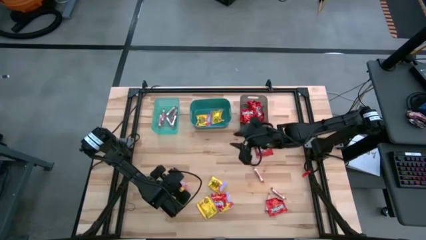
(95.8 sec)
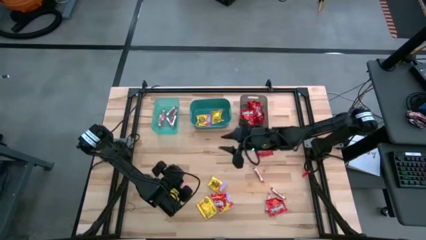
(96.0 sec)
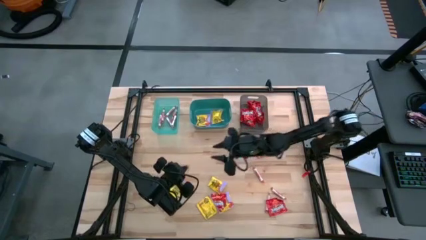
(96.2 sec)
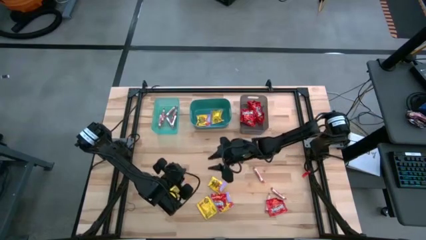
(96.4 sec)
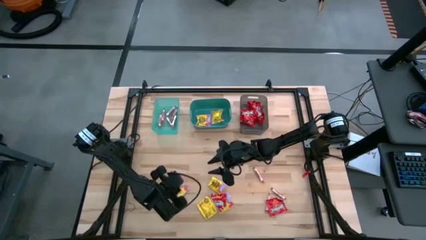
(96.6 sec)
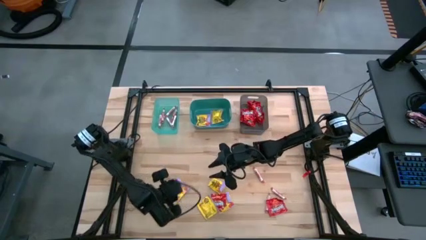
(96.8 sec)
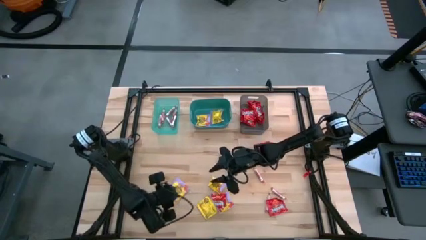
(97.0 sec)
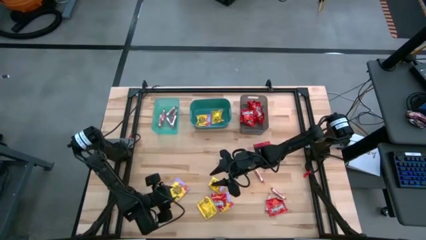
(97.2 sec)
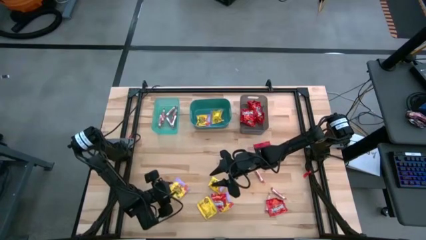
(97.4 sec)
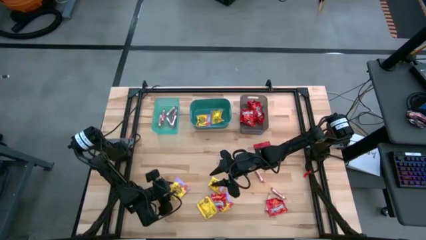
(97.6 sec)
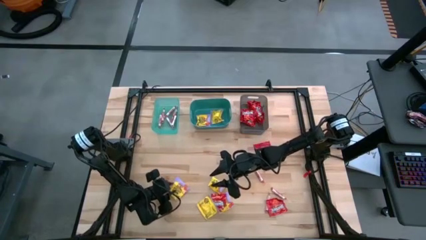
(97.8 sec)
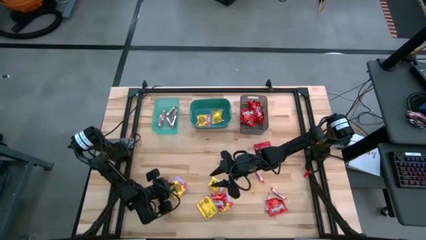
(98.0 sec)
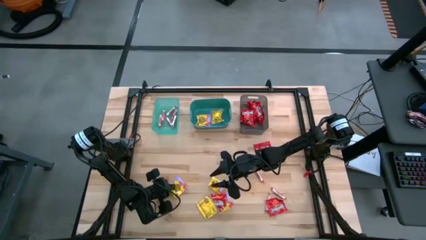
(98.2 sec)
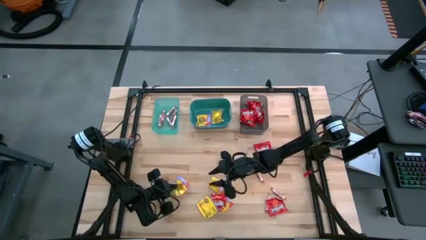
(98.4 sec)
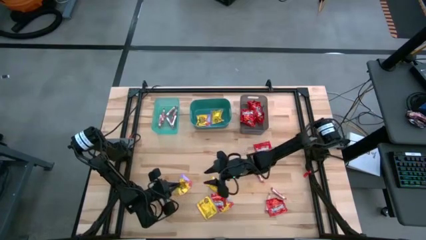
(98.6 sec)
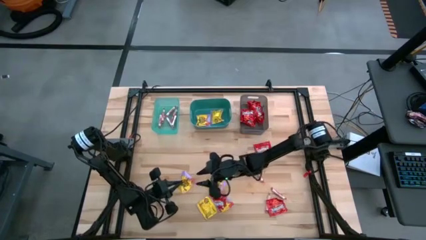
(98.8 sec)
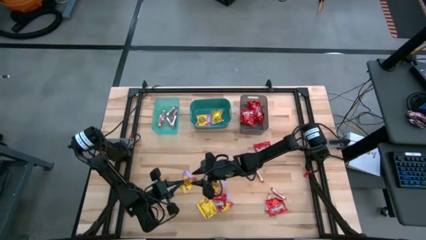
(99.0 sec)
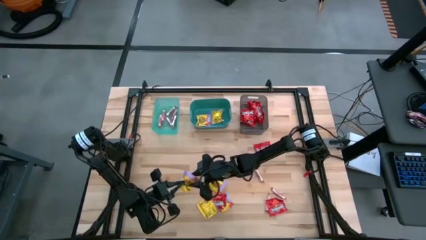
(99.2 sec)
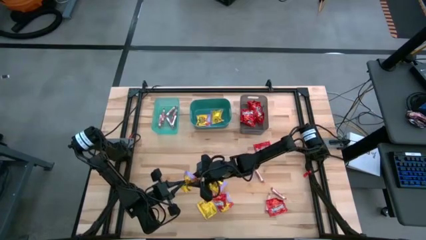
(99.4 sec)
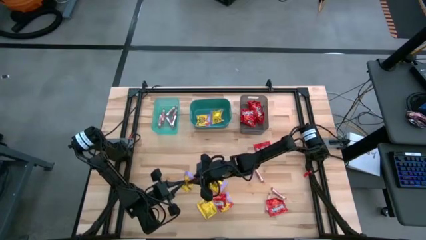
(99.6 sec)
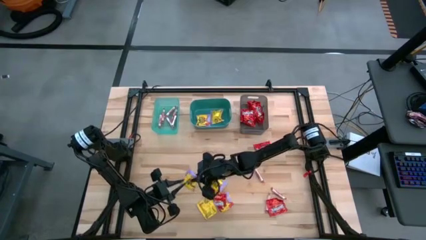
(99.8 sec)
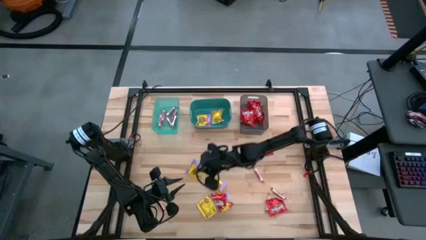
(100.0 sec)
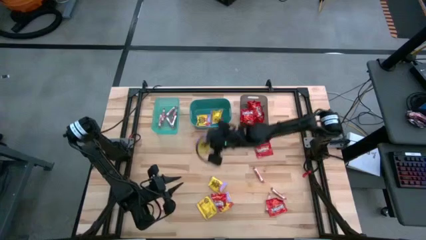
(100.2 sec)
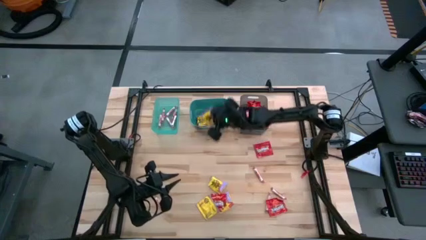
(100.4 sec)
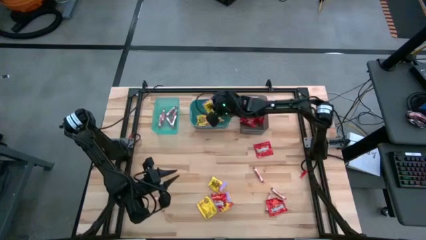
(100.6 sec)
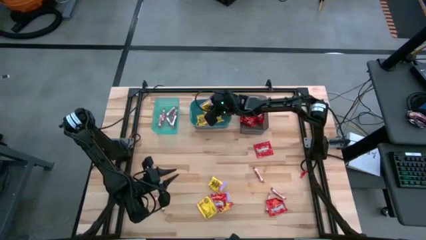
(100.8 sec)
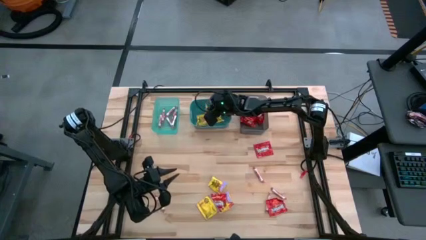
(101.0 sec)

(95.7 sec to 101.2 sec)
Task: Sort candy
Put the yellow candy into the green bin

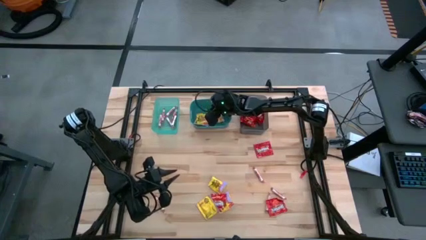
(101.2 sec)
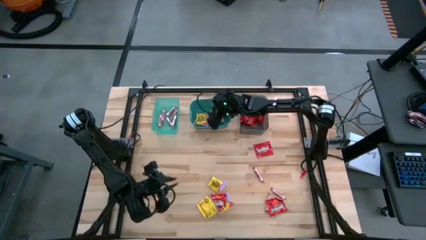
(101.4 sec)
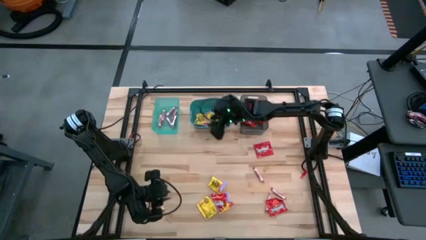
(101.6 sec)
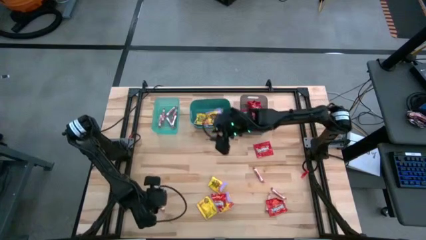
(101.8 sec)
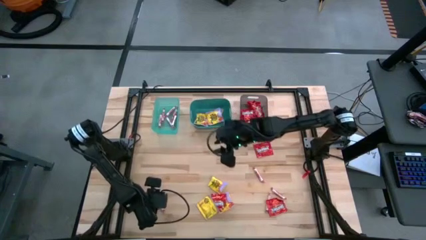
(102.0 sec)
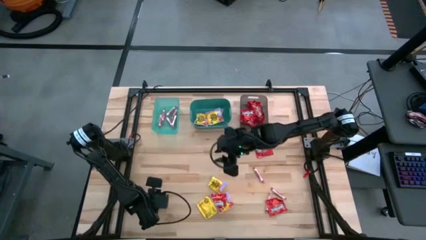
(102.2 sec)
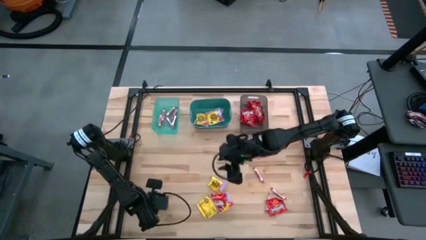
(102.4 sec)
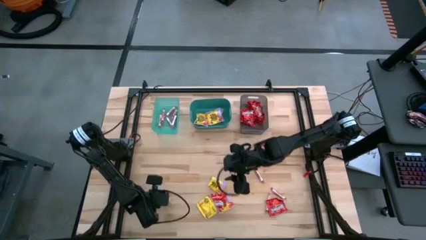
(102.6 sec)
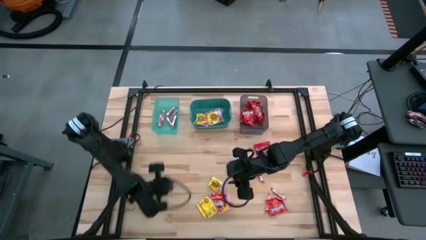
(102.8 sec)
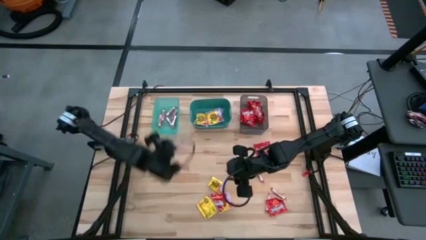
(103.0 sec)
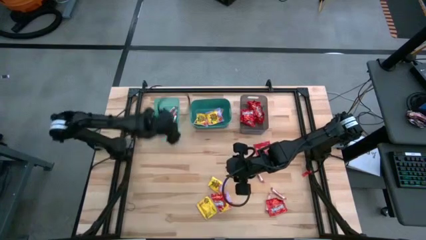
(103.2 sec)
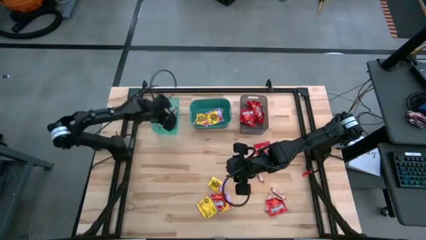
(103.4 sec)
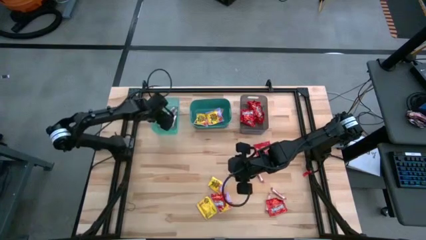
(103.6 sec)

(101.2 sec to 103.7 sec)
Put the white candy into the blue bin

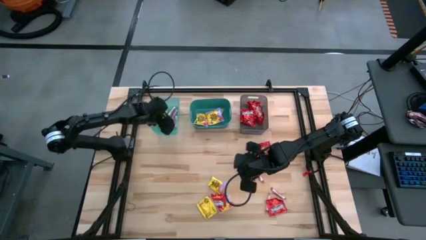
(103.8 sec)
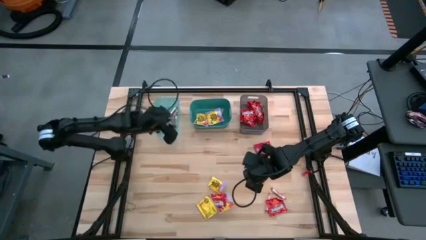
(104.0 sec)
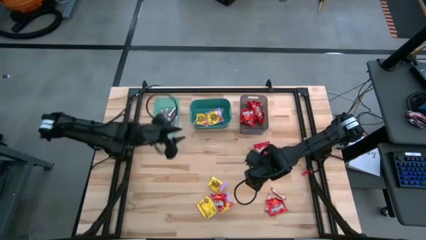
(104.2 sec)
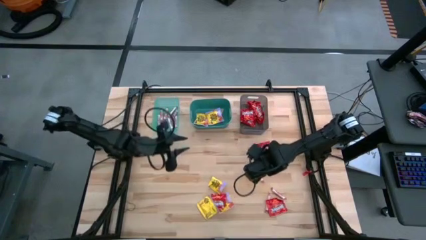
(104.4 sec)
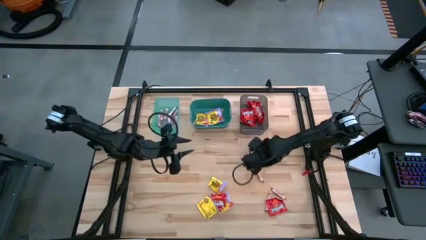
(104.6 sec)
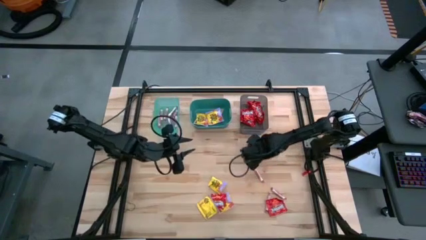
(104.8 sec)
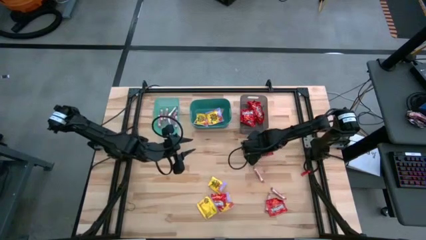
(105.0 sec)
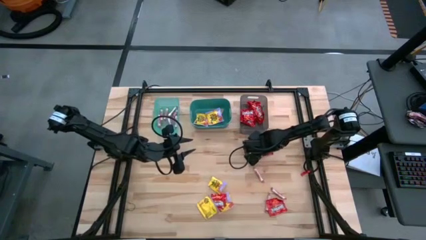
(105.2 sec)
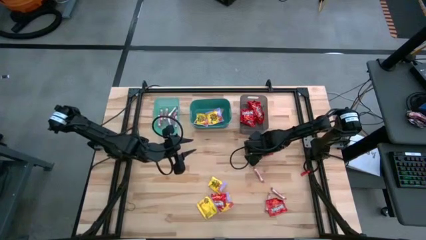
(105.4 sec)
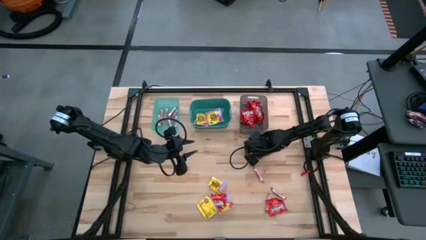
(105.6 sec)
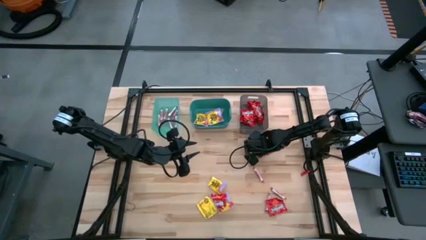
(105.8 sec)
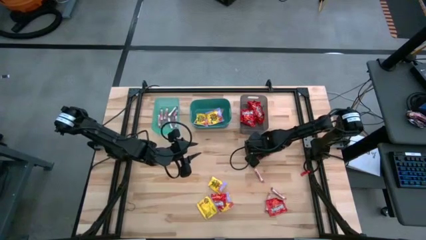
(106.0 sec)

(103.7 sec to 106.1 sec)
Put the red candy into the black bin

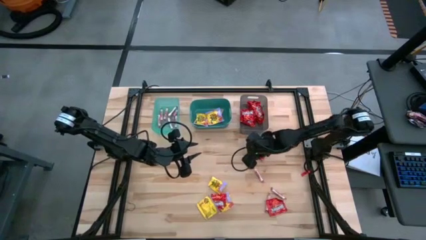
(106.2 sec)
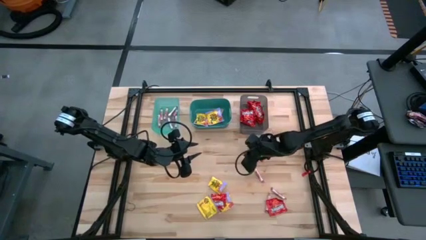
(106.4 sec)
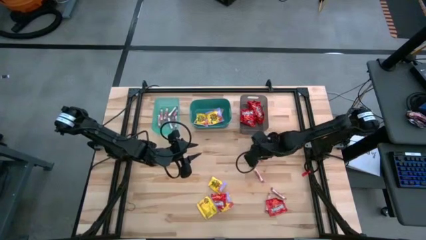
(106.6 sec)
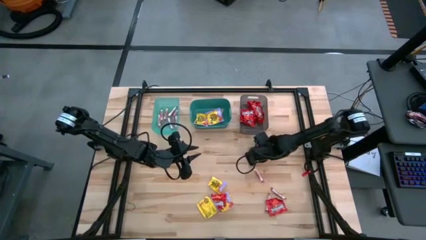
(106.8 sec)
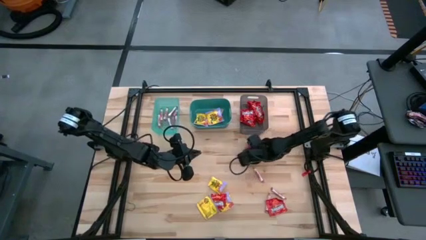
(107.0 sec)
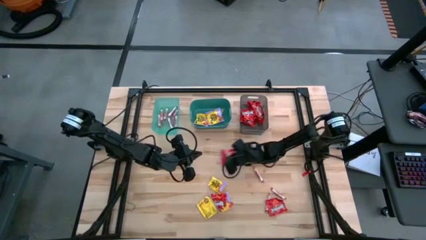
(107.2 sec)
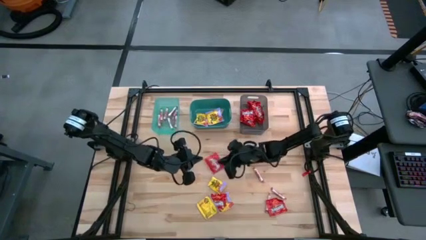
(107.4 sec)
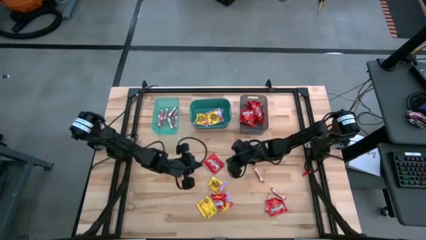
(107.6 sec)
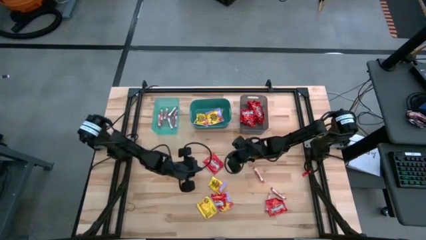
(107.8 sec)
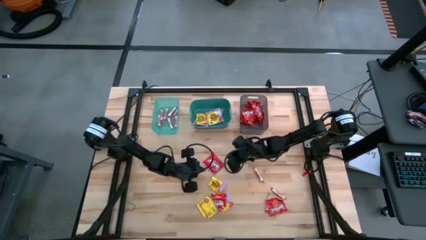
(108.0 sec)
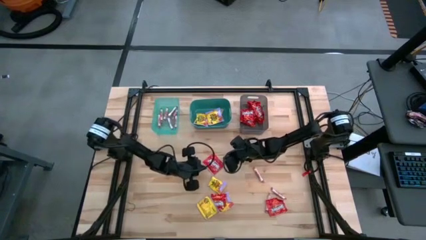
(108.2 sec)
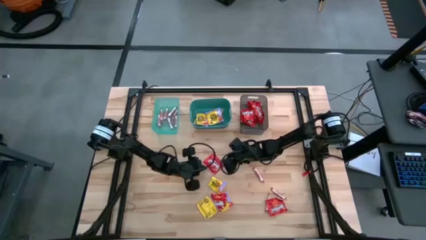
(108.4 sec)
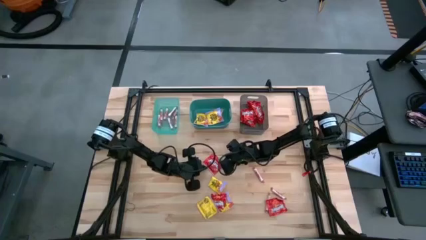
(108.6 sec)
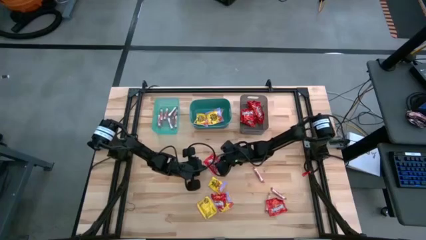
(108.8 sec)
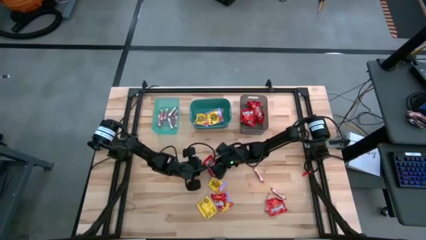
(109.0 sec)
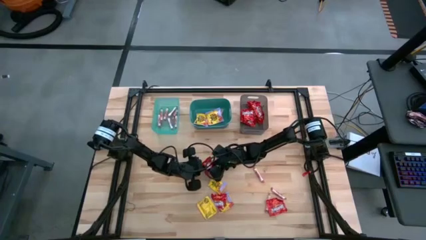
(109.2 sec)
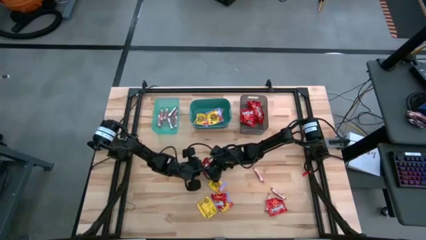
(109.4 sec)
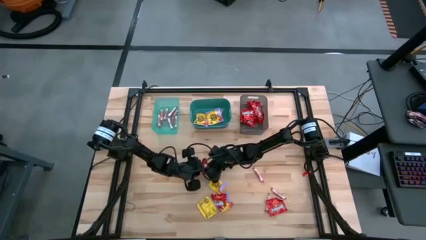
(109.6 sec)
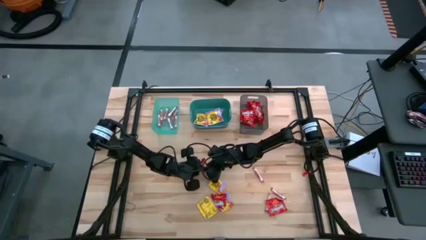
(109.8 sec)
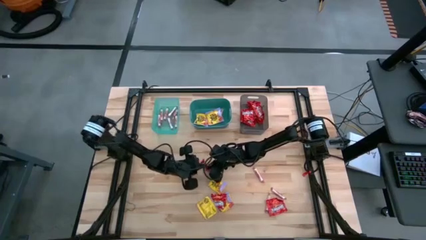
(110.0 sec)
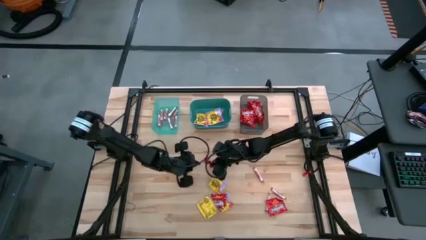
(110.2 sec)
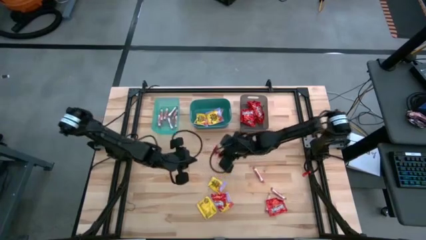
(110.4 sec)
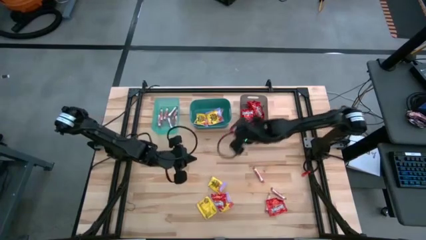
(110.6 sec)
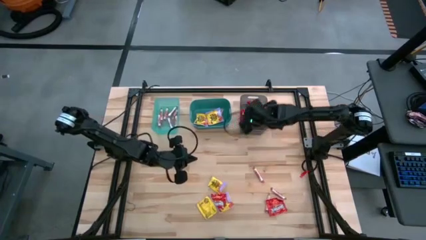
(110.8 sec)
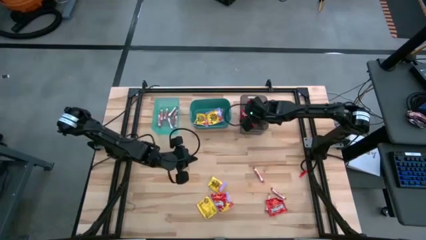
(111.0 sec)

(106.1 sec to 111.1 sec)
Put the red candy into the black bin

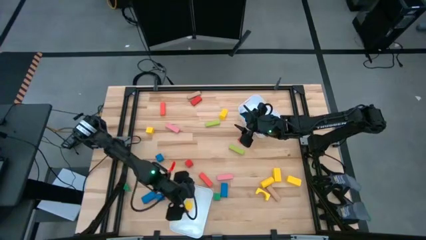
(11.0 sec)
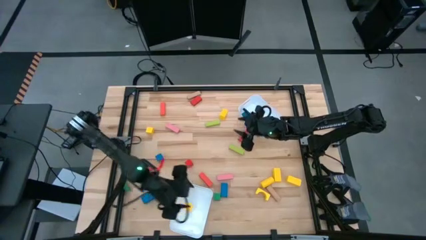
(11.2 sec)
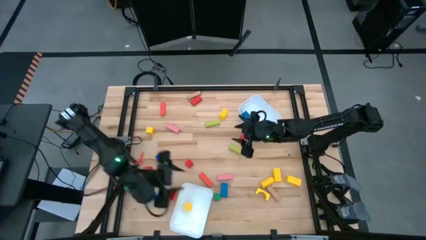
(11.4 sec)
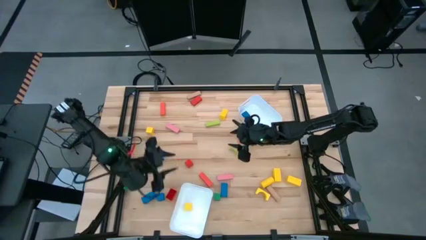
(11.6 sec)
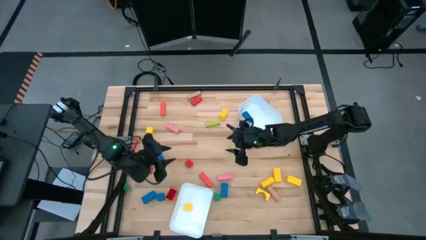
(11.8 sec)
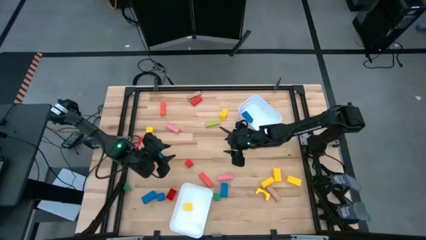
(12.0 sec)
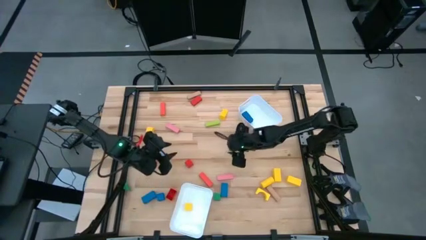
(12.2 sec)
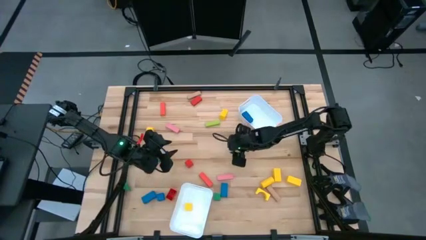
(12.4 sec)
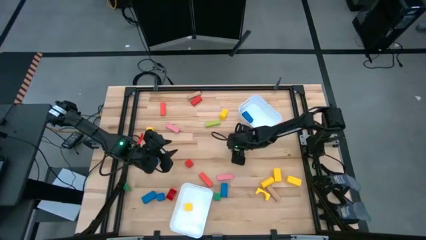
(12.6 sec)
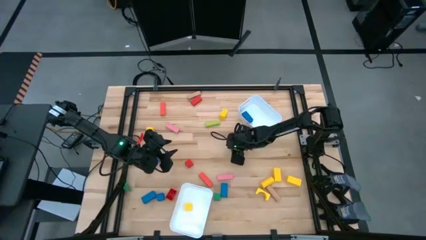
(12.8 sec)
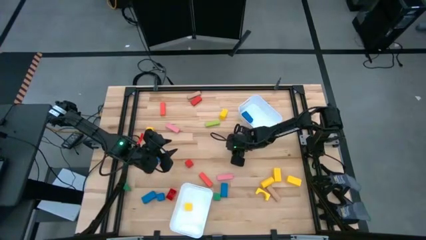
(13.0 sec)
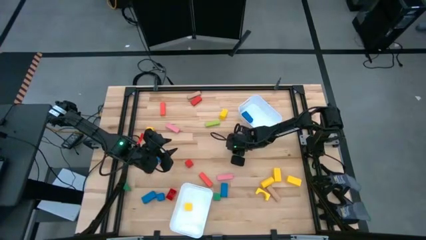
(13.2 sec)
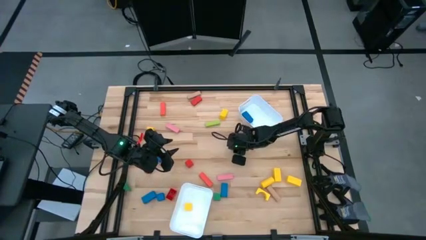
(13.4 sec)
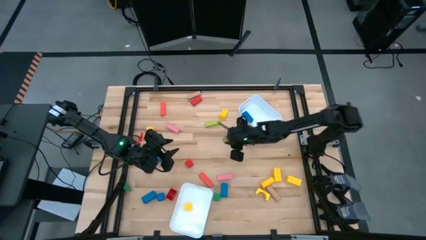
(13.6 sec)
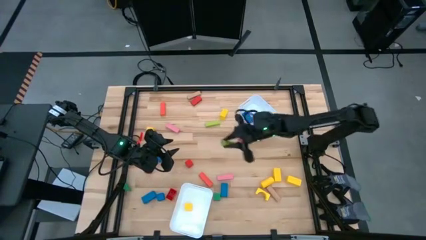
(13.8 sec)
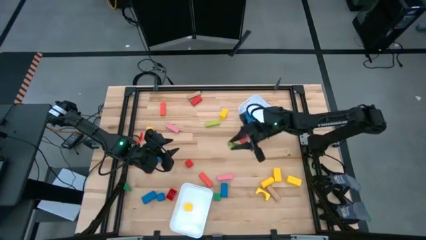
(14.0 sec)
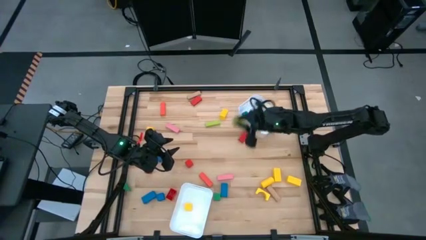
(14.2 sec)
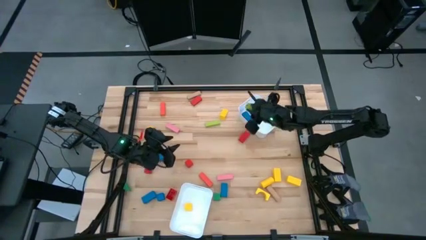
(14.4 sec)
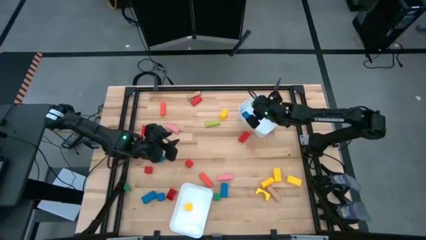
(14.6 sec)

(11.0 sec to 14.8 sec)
Task: Sort blocks by size
Put the green rectangle block into the top white bin
